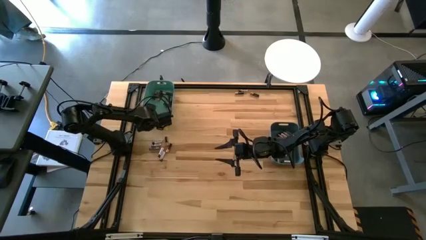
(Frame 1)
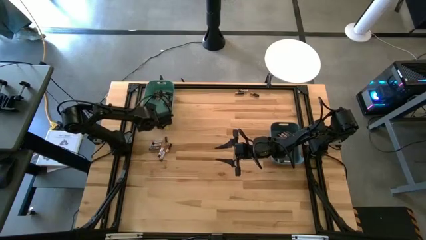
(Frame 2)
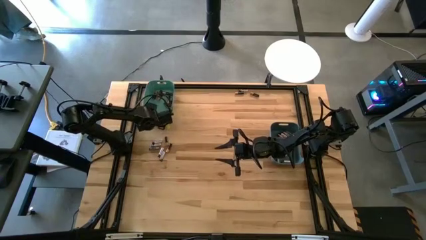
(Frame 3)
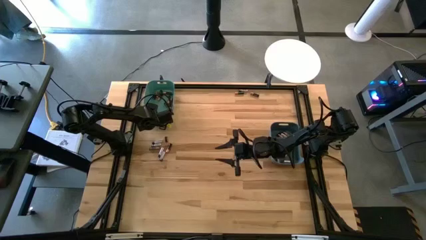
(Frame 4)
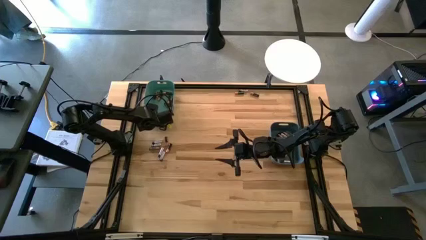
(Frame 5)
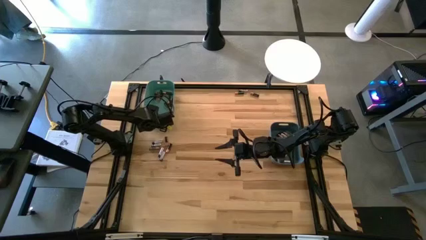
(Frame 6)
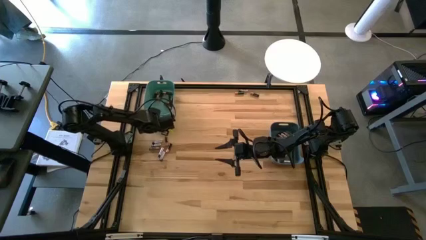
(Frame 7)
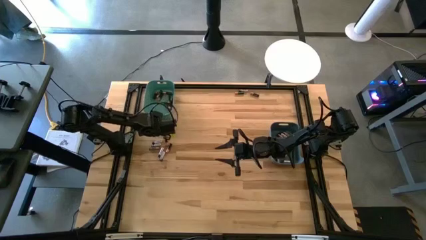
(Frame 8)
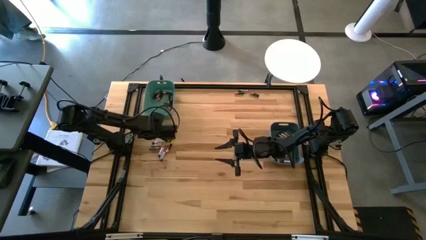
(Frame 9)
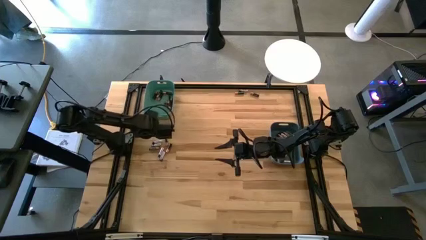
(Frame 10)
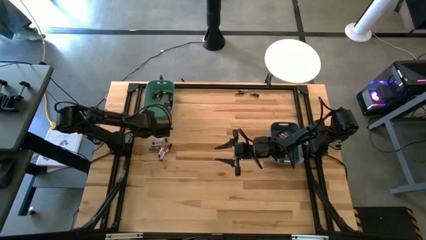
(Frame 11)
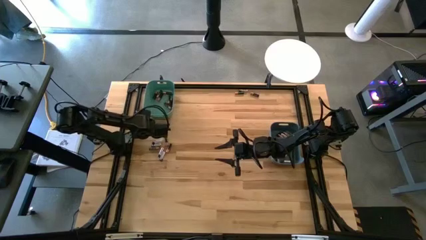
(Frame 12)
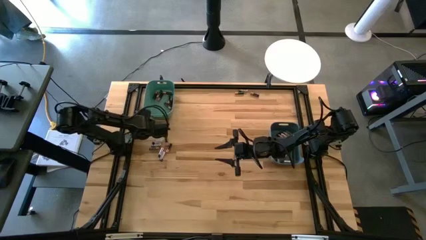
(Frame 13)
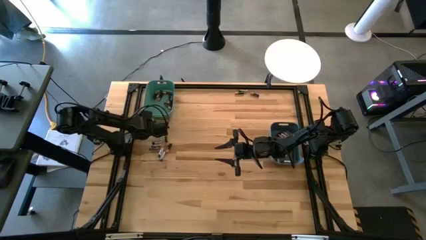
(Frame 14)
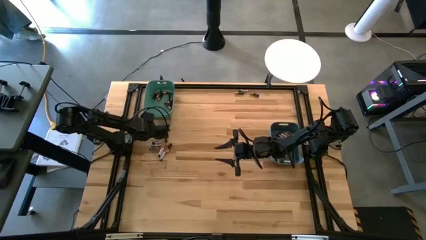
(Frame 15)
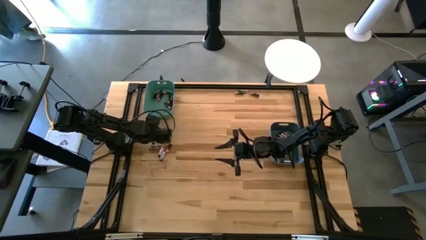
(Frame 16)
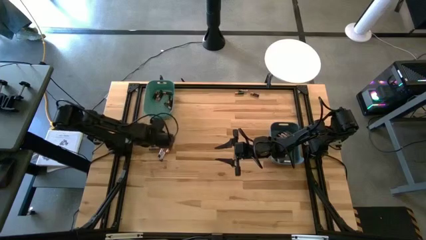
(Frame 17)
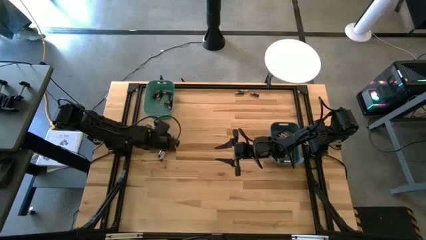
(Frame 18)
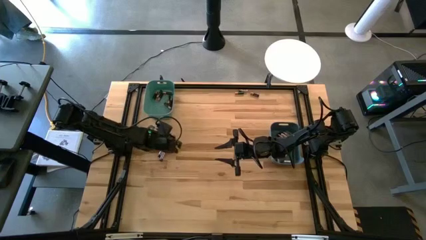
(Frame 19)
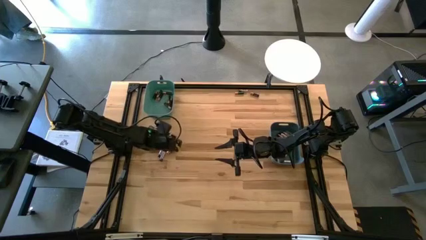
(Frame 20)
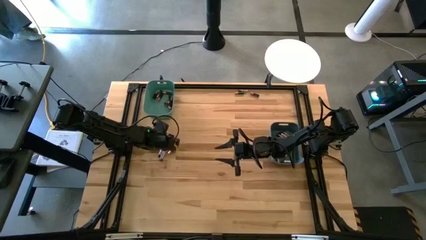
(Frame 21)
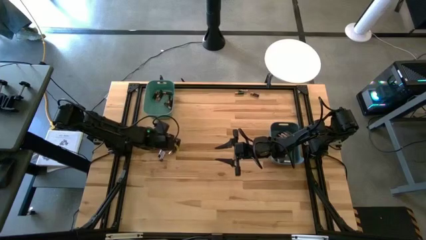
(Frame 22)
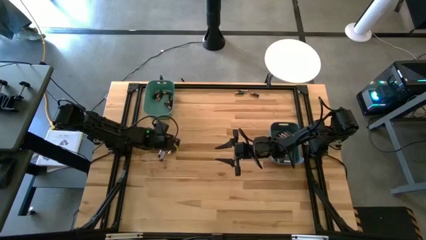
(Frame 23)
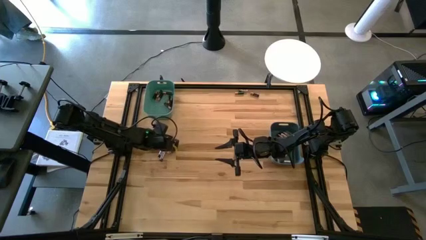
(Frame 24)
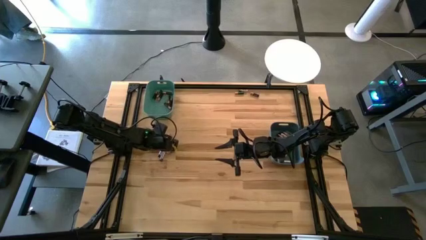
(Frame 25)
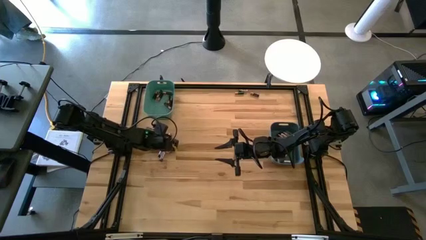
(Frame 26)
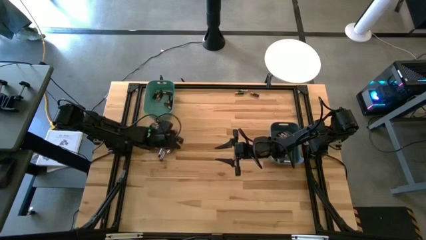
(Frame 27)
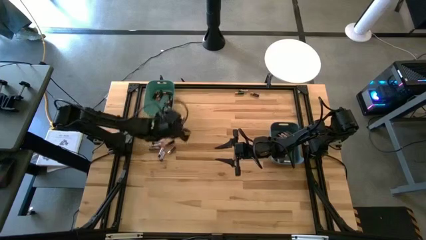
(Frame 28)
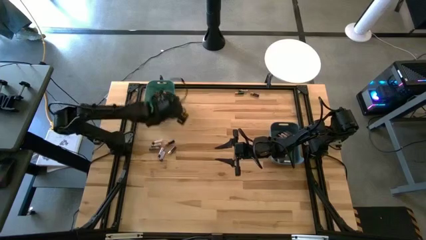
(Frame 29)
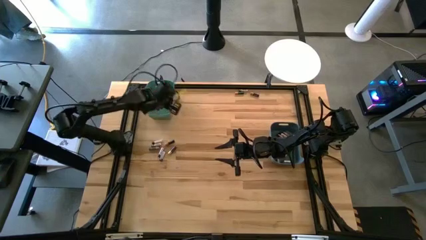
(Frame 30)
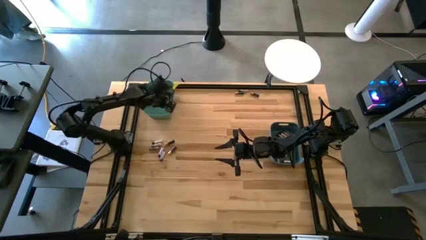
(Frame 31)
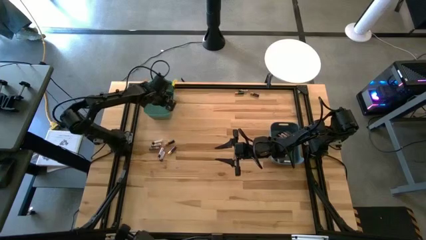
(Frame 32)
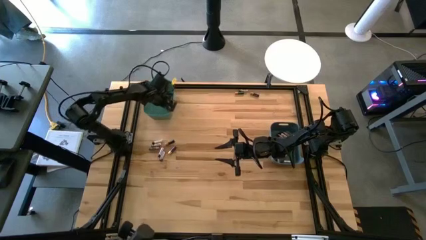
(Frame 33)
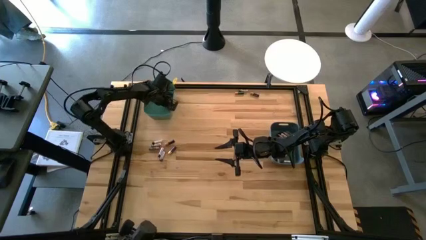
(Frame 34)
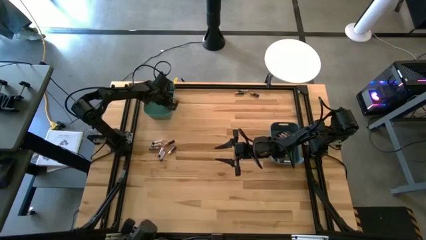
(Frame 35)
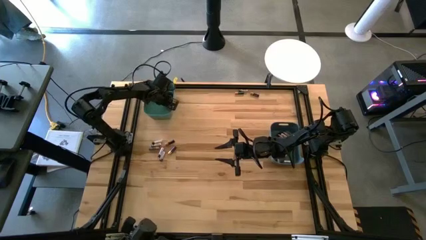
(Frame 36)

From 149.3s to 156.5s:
Task: Sort batteries
Put the black battery into the green bin

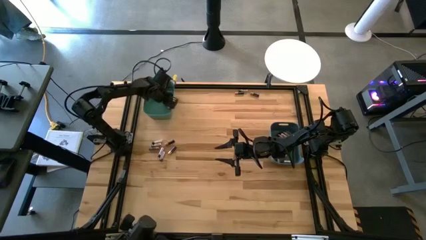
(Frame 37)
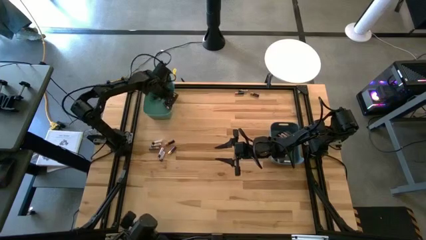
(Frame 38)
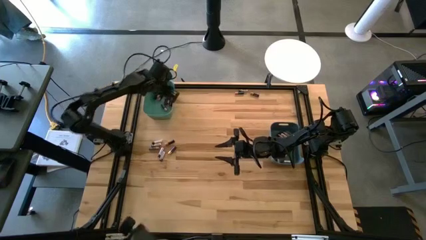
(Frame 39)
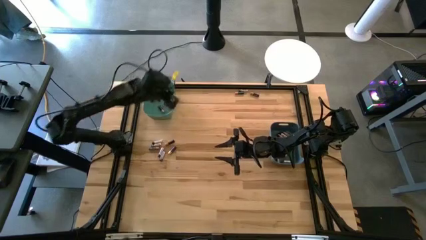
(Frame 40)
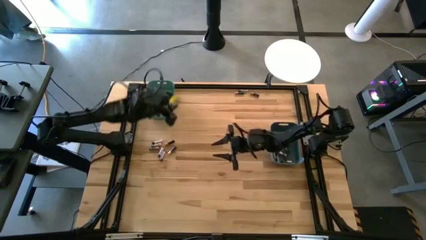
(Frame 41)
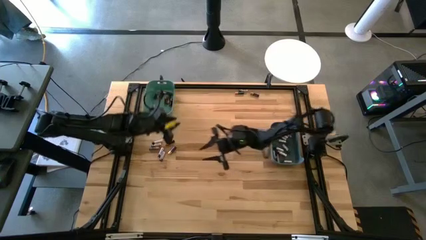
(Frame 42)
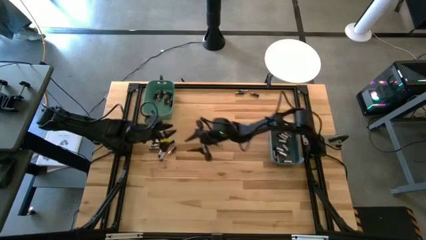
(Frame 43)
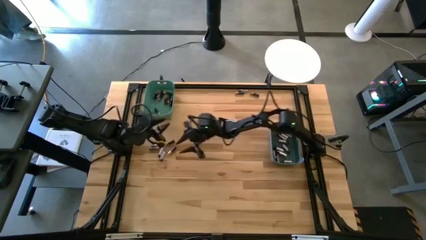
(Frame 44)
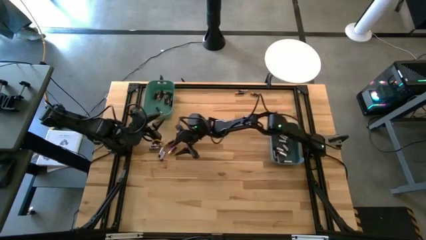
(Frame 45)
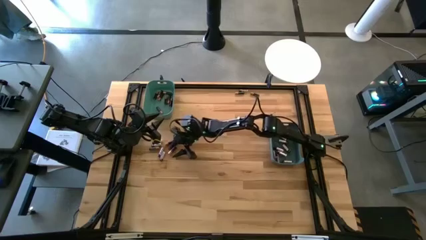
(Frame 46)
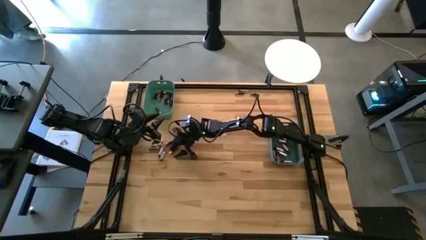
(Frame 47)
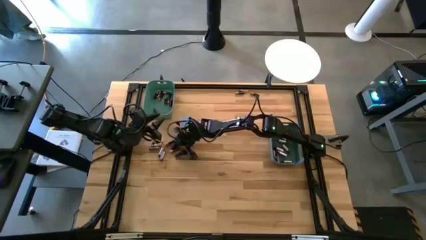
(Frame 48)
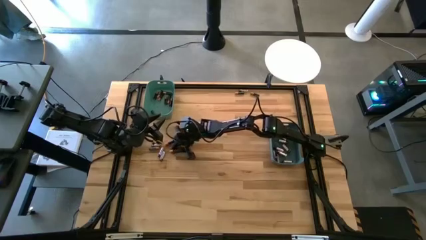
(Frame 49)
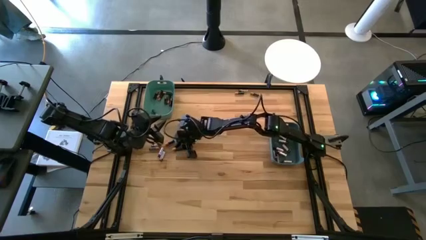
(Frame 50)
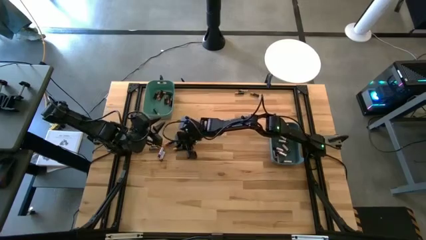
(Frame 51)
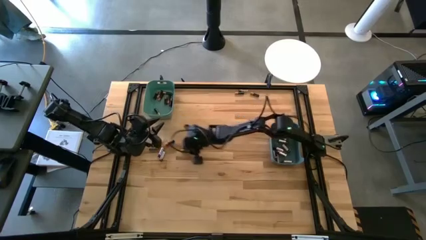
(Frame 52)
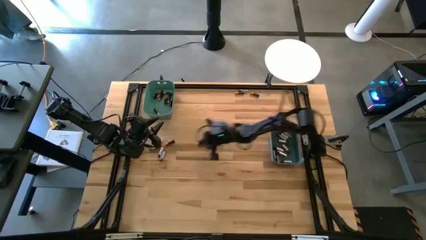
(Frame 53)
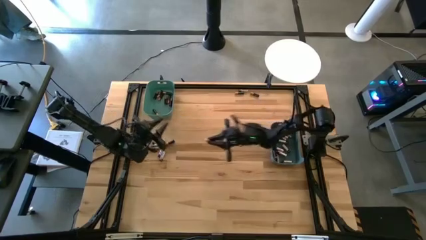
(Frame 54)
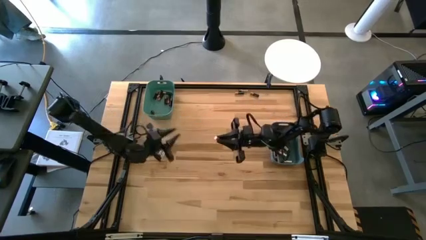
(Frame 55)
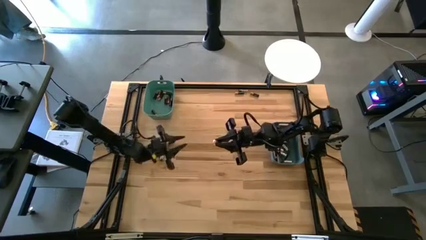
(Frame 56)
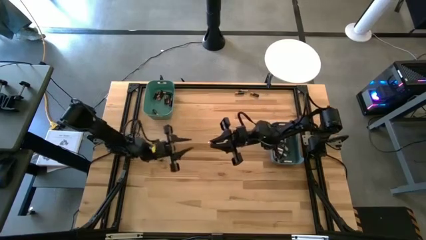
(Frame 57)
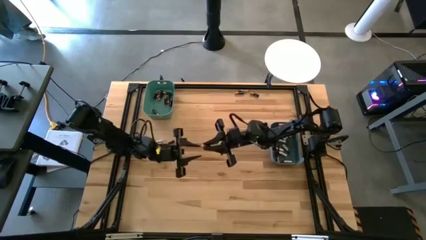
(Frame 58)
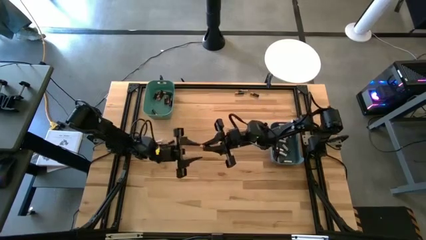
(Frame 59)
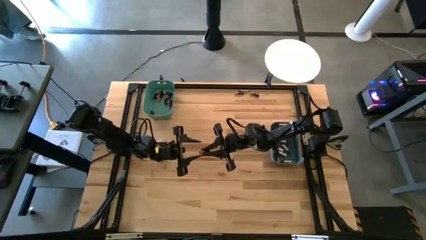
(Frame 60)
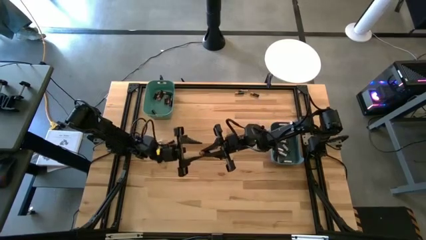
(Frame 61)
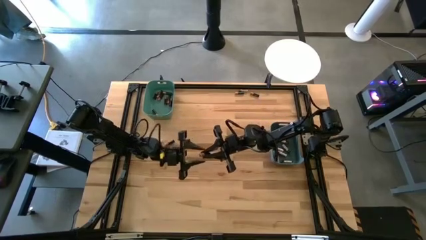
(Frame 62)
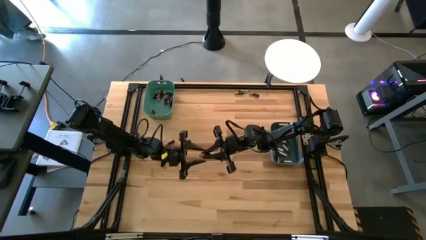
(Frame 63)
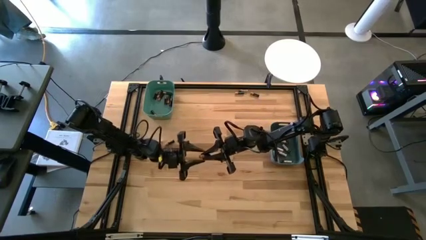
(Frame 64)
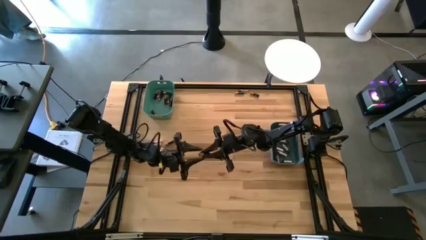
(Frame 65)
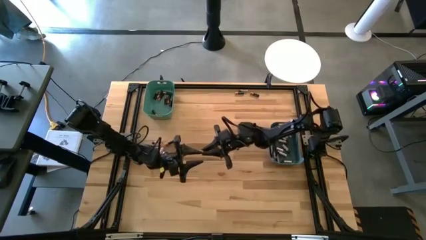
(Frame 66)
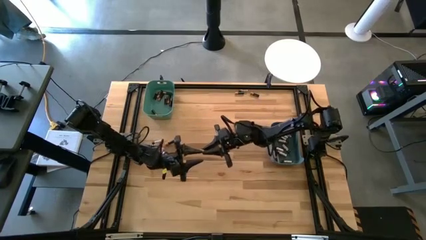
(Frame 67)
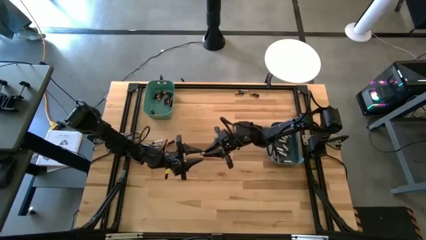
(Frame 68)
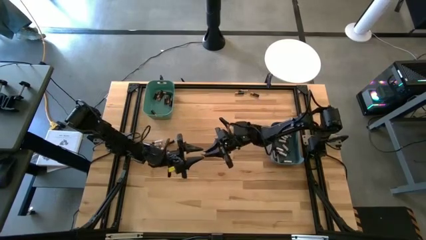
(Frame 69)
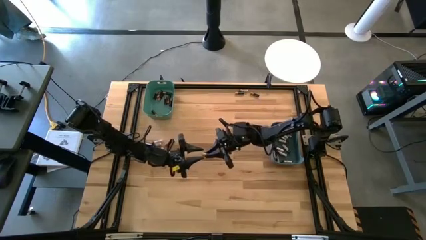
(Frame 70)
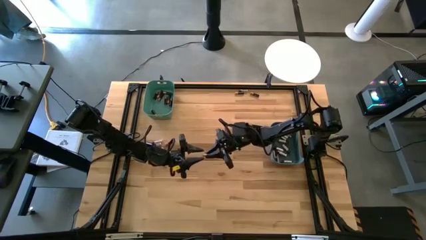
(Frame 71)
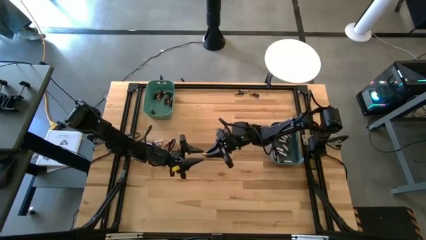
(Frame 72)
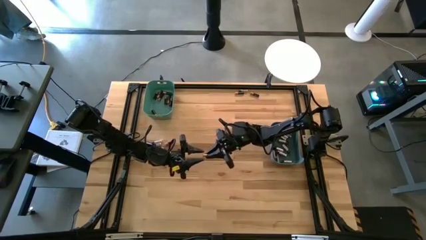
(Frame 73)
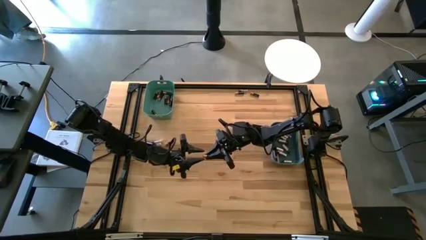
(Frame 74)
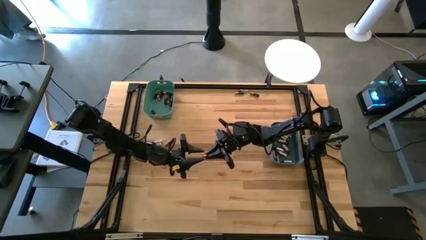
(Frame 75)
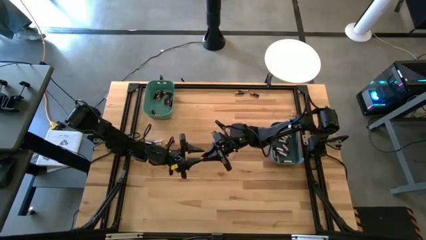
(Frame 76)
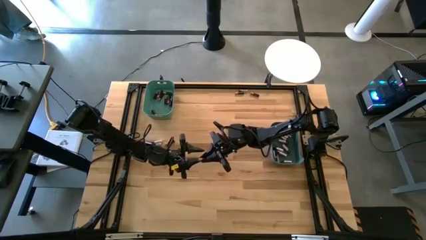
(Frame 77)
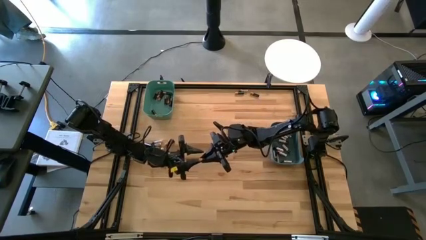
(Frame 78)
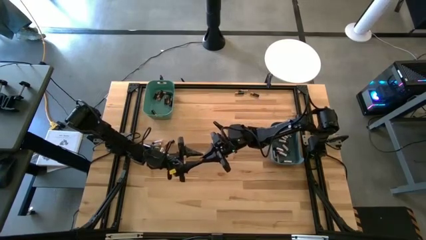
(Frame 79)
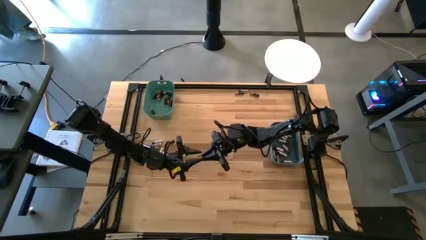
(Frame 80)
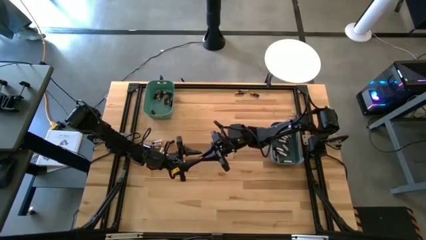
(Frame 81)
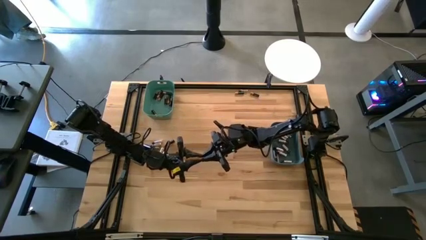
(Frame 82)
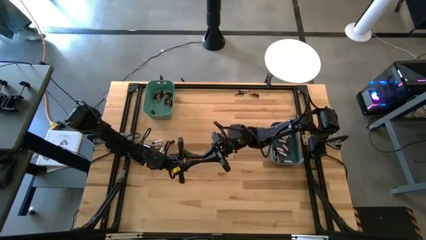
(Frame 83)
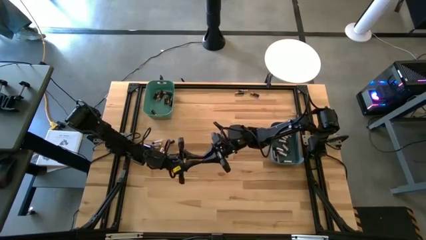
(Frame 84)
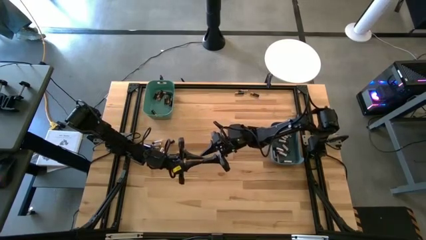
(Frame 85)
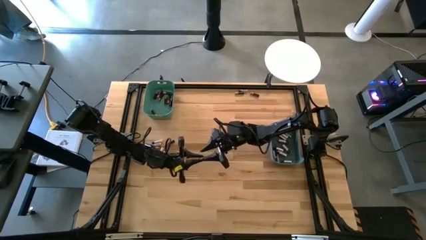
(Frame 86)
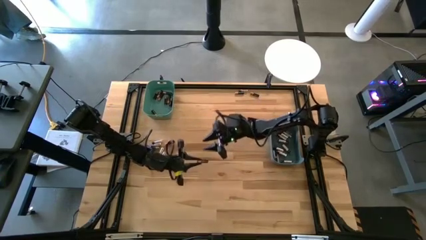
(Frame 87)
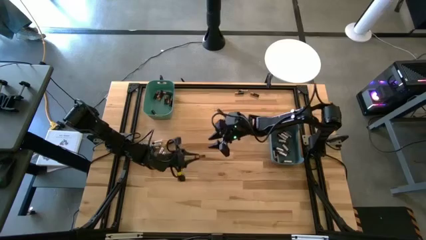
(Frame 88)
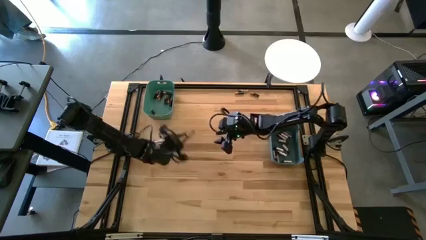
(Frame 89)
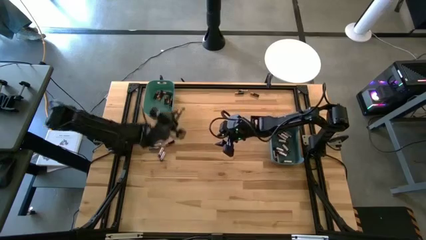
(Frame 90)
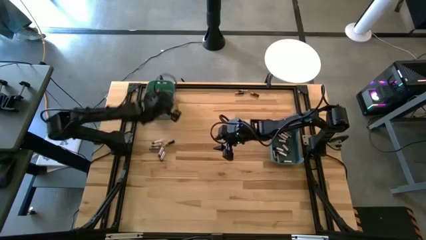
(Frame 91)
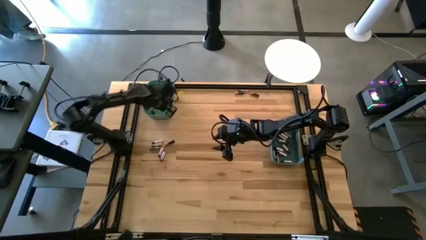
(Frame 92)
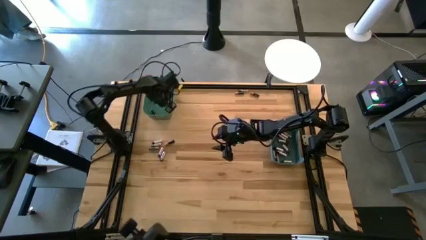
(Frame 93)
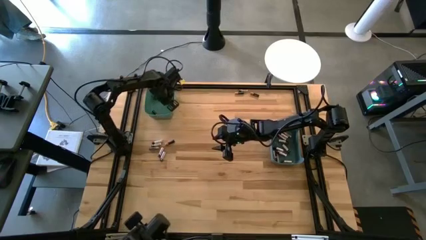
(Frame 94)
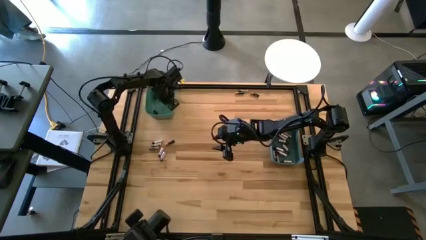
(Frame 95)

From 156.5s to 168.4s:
Put the black battery into the green bin
